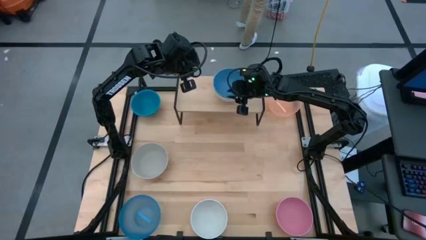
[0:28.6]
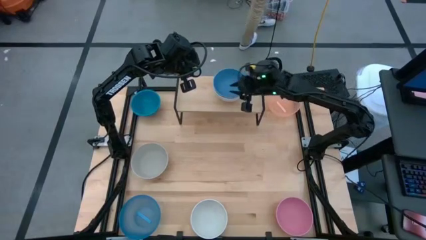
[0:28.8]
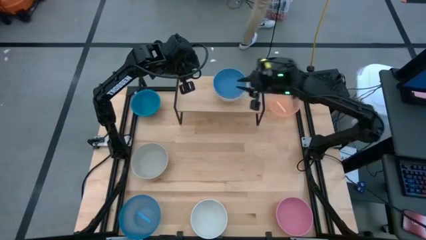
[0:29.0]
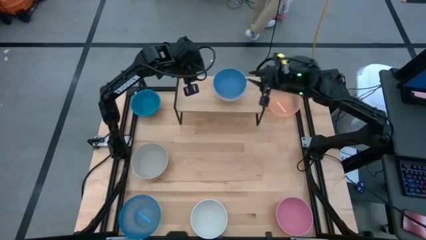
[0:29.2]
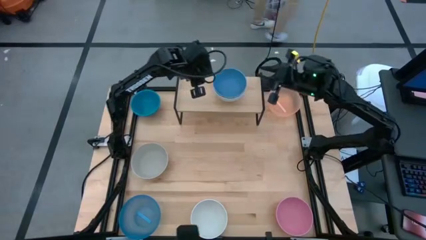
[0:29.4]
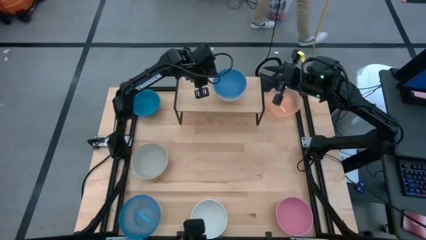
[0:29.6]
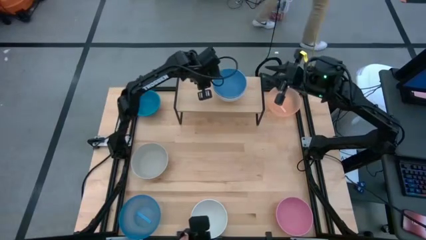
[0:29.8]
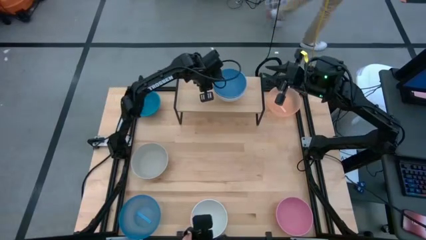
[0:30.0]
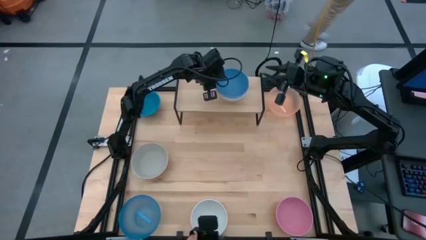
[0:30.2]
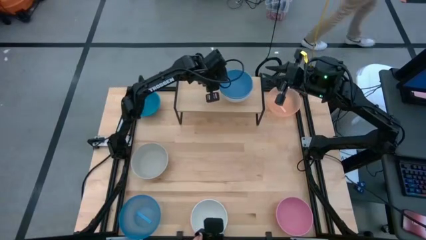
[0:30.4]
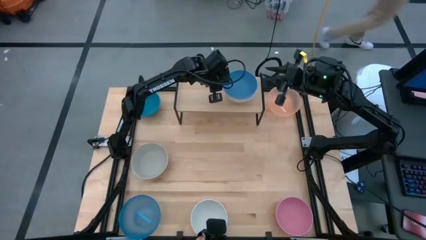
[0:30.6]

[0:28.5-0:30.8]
Task: Place and stack bowls onto a shelf
Adjust the stacked bowls on the shelf

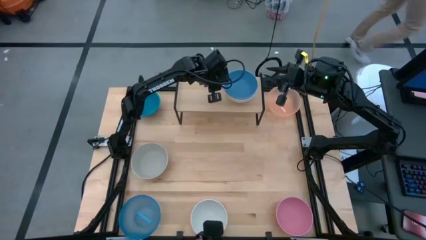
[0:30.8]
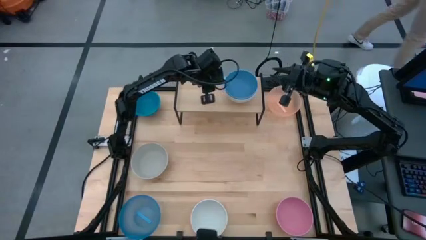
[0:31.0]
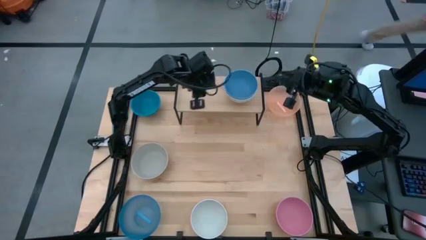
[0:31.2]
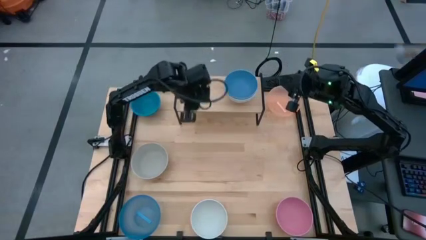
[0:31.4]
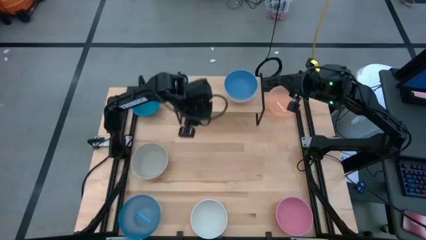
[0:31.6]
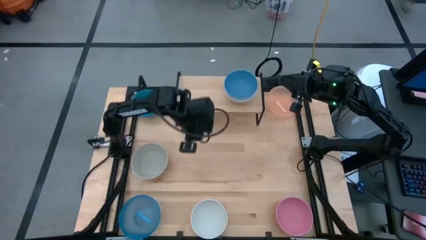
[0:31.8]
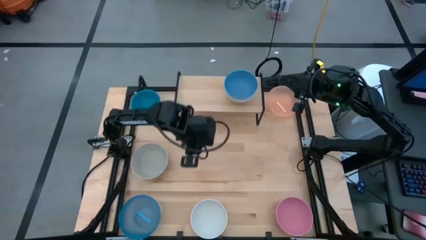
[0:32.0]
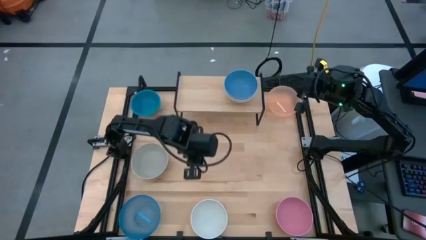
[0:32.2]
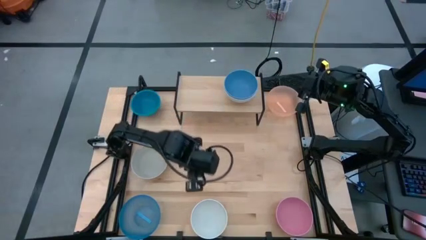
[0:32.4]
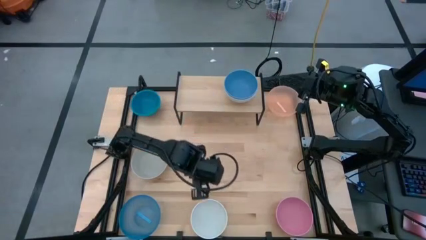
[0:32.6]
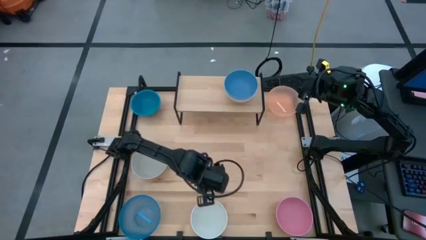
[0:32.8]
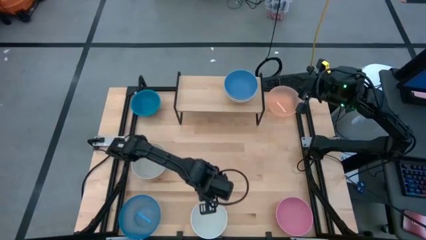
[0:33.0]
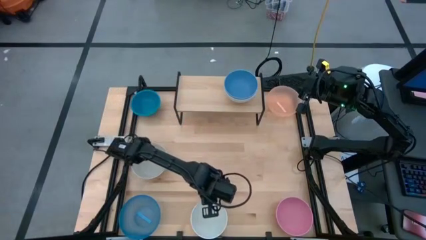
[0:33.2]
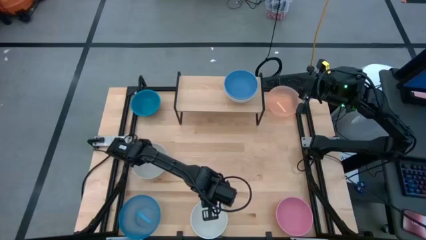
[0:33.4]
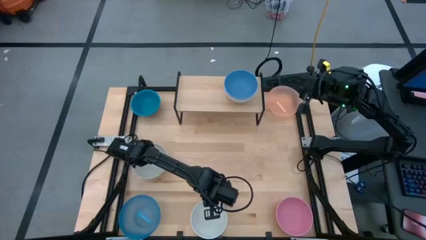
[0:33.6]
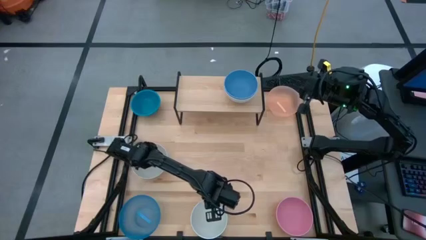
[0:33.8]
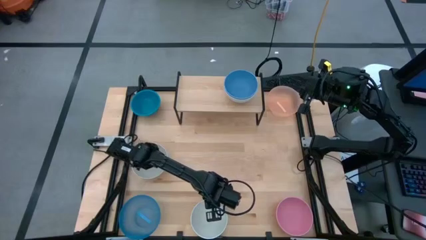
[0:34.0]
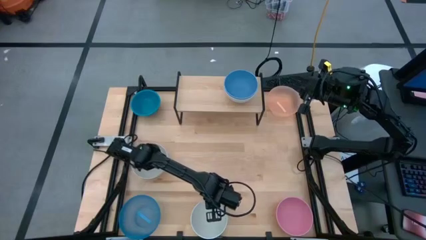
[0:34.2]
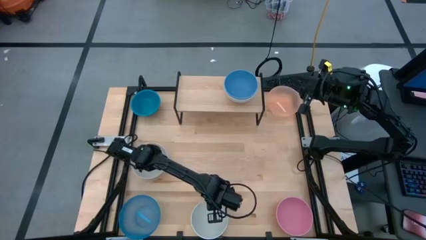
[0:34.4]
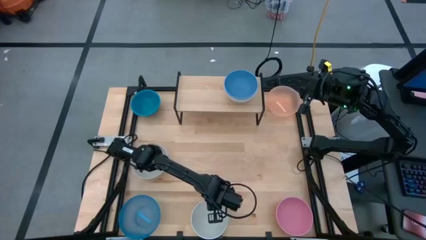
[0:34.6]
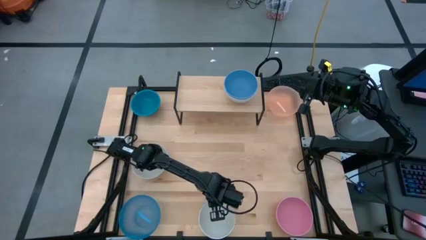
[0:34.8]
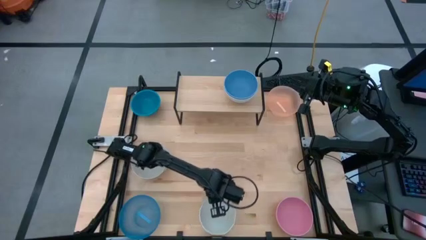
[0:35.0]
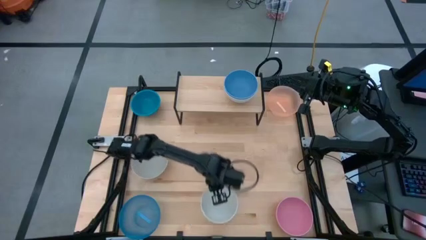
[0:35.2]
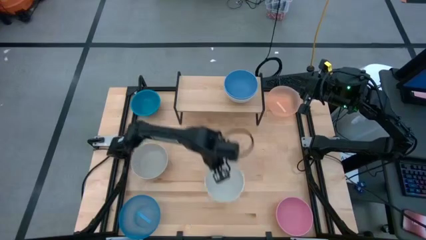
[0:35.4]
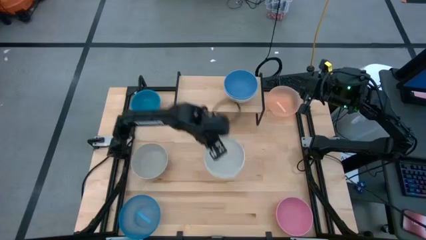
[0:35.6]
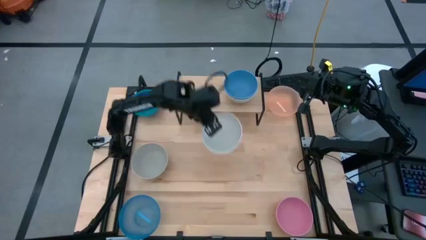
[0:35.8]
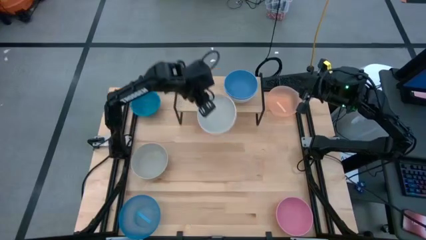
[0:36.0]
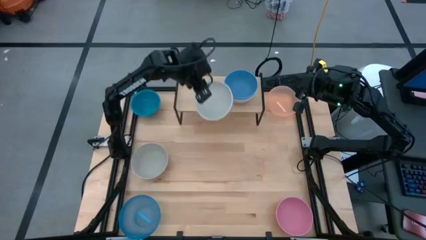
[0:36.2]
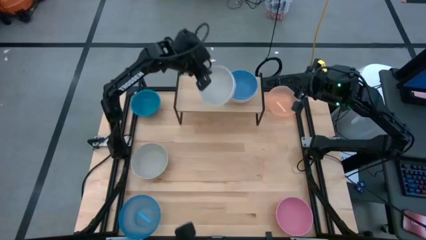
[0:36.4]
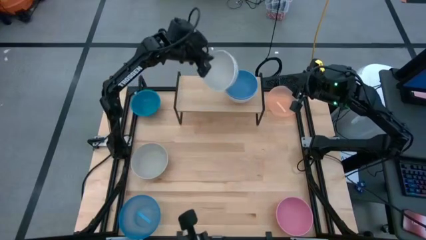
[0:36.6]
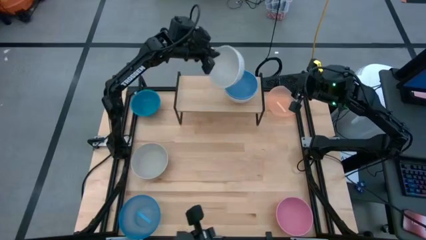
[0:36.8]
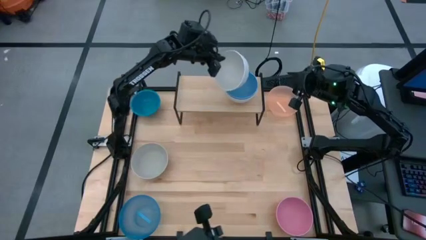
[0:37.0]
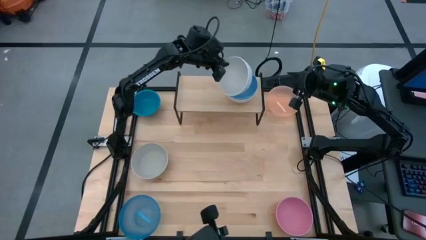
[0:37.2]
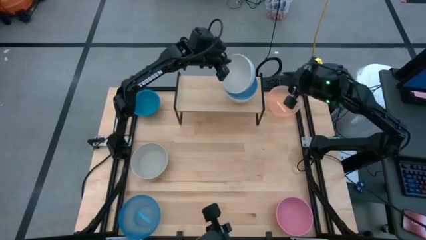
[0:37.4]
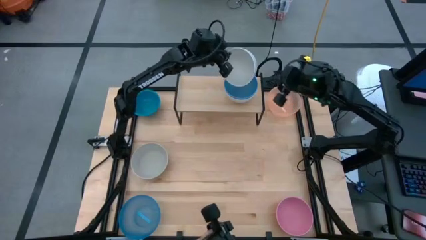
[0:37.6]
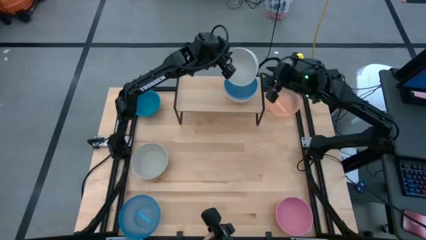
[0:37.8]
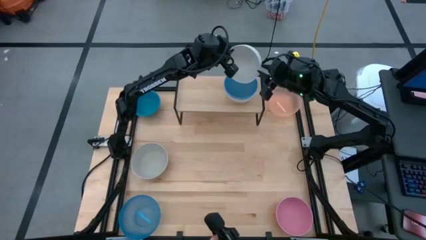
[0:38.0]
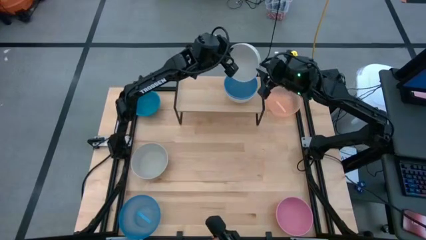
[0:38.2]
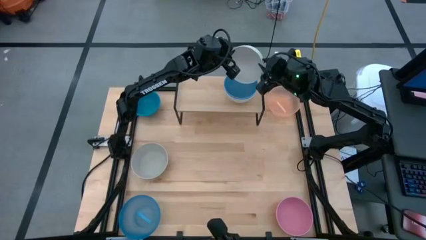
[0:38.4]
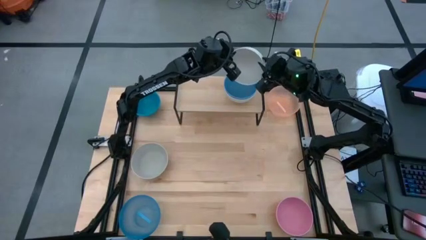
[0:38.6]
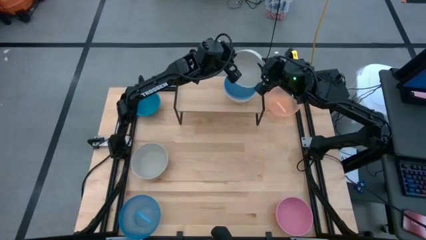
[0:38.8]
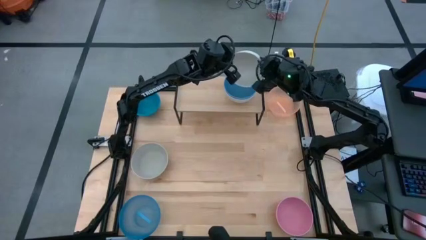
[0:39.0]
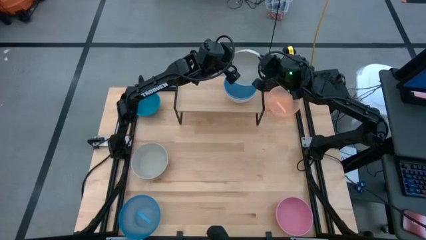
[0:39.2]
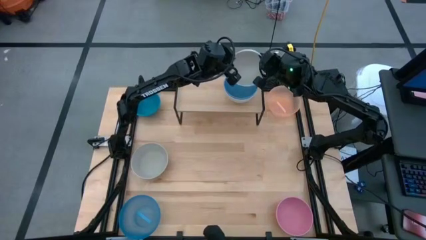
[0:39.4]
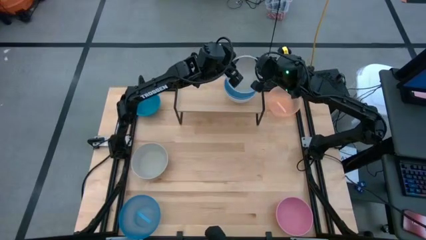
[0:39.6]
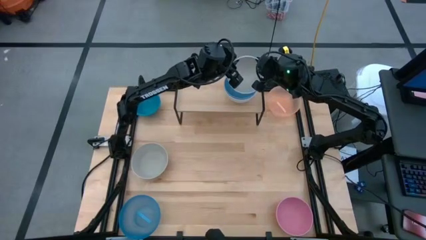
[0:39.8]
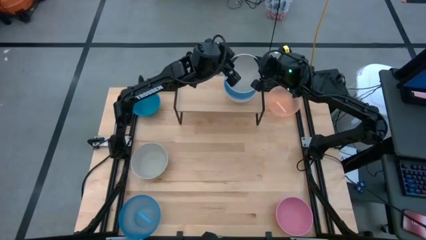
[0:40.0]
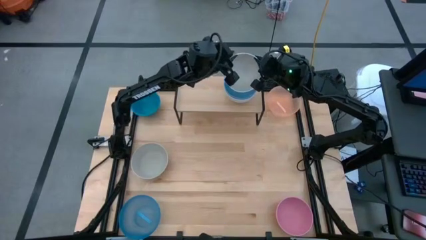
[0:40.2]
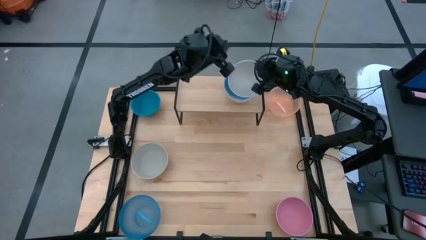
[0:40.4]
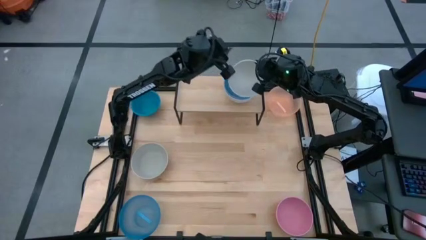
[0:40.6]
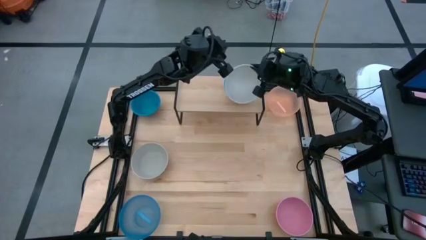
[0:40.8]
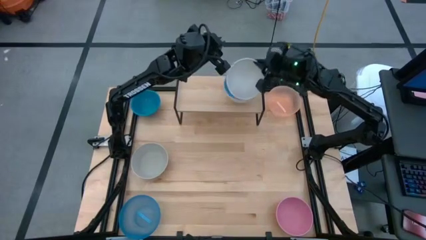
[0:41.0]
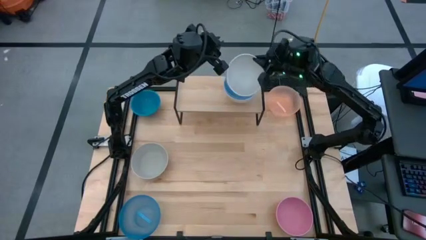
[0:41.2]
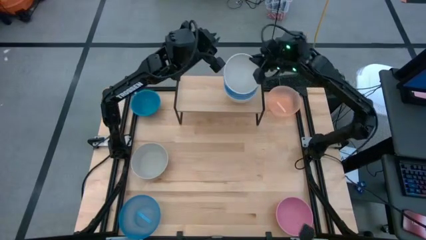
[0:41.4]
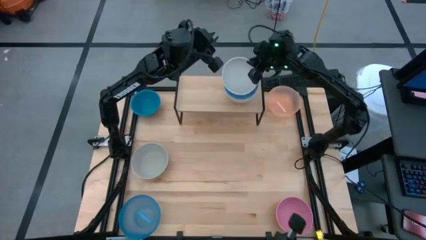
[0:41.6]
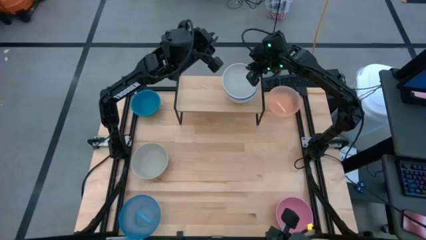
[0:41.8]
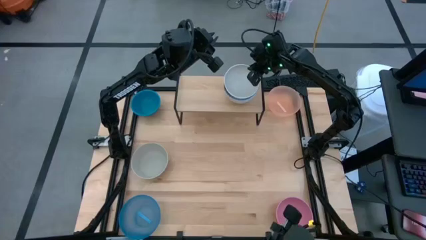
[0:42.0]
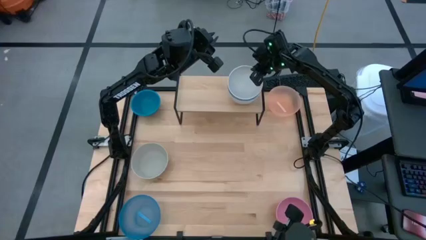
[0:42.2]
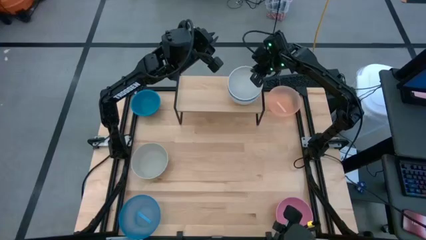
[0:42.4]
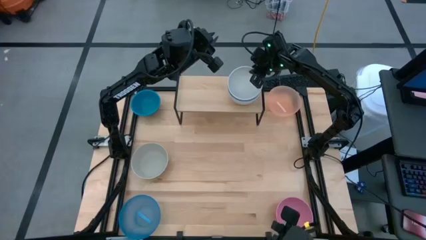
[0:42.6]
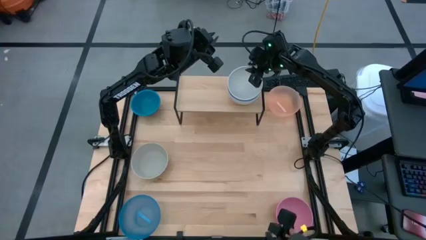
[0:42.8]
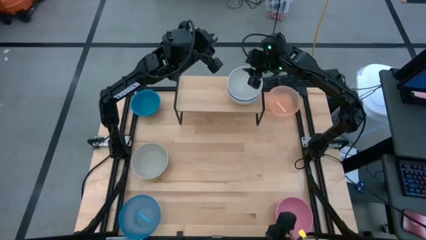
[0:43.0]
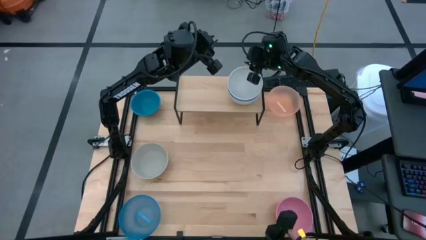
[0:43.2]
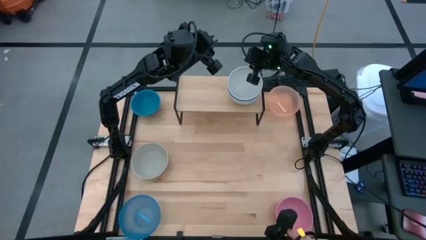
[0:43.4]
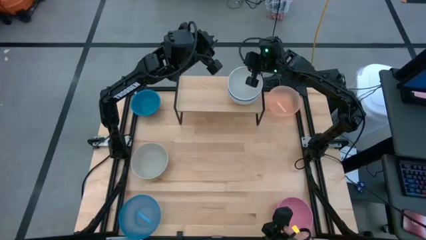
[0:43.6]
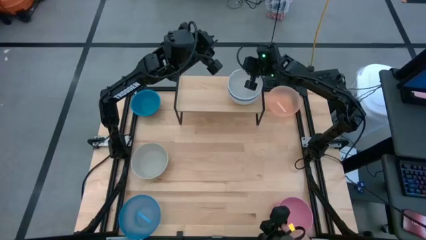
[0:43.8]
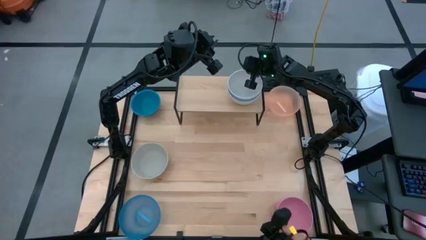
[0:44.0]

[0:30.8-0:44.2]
Stack the white bowl on top of the blue bowl on the shelf
